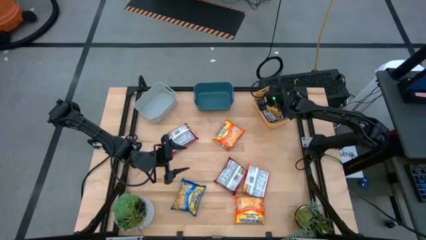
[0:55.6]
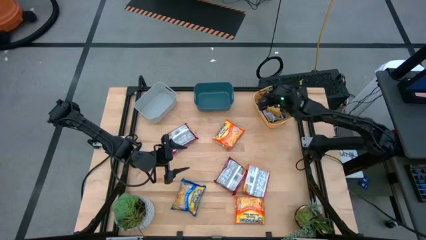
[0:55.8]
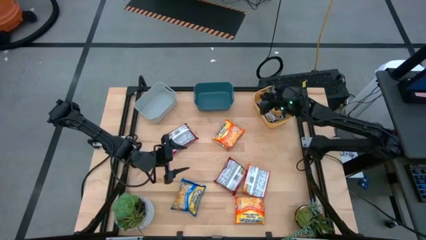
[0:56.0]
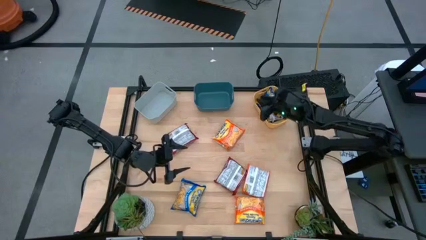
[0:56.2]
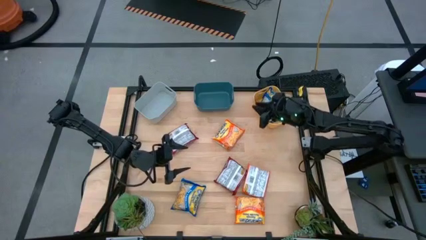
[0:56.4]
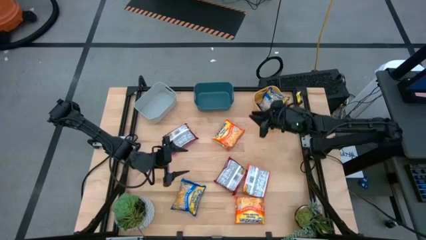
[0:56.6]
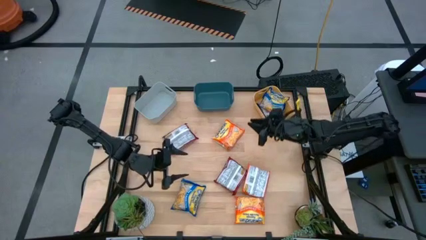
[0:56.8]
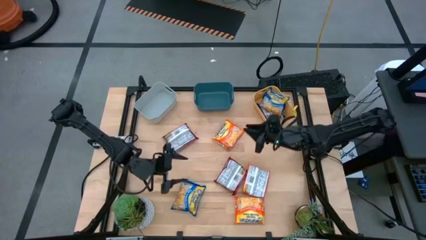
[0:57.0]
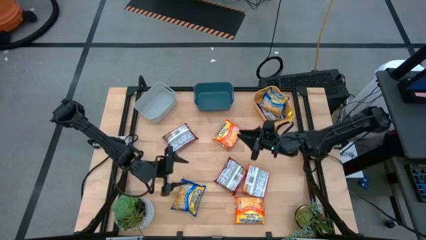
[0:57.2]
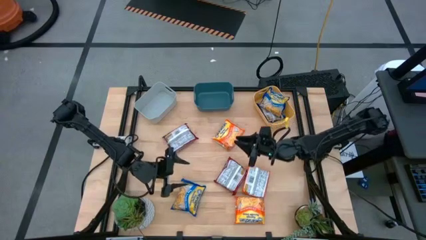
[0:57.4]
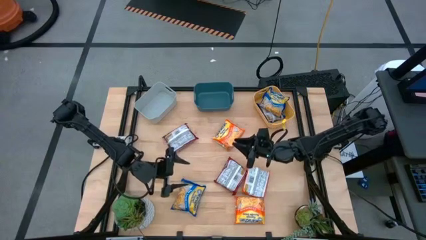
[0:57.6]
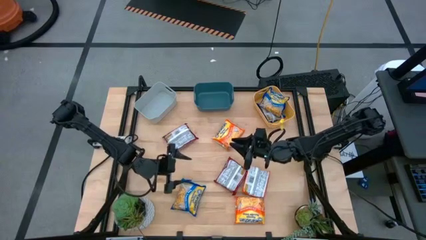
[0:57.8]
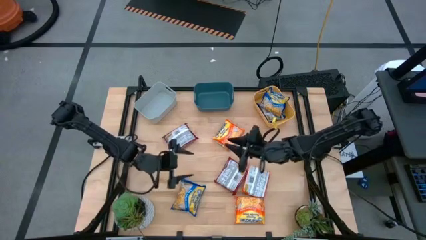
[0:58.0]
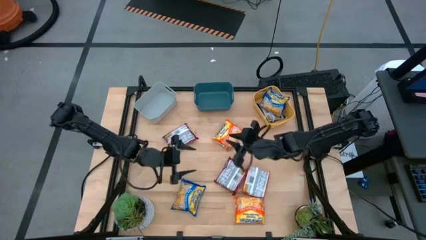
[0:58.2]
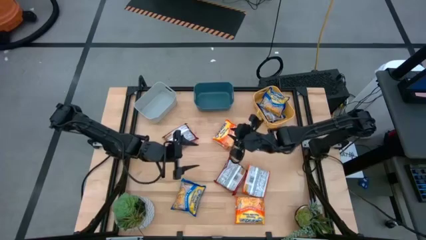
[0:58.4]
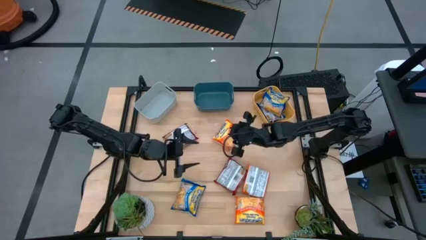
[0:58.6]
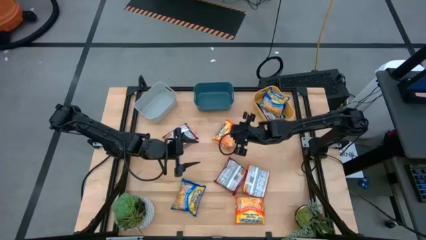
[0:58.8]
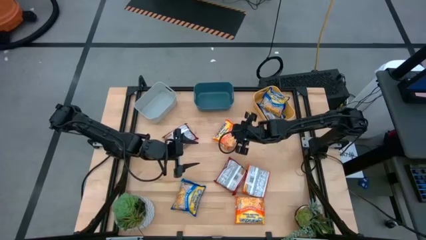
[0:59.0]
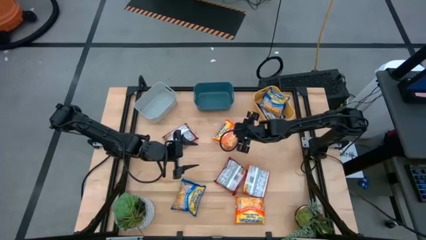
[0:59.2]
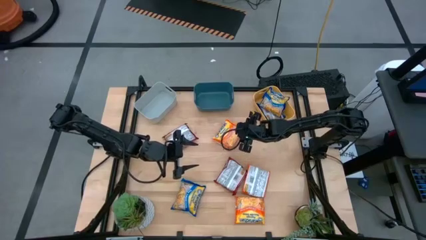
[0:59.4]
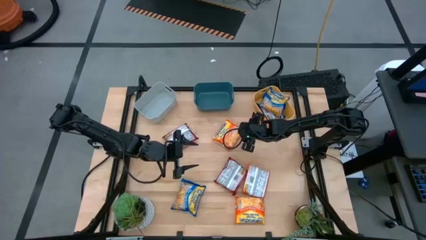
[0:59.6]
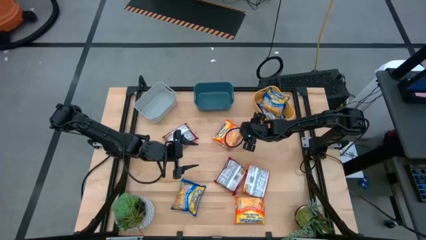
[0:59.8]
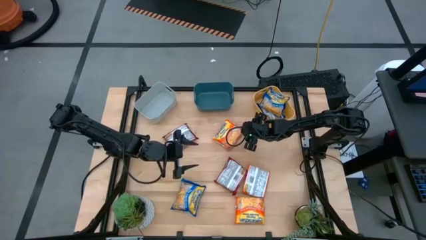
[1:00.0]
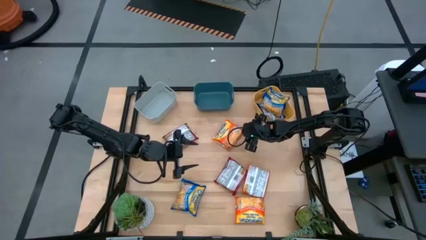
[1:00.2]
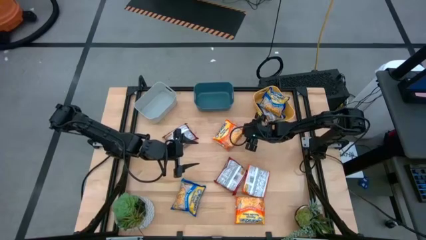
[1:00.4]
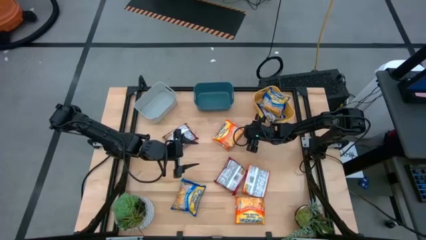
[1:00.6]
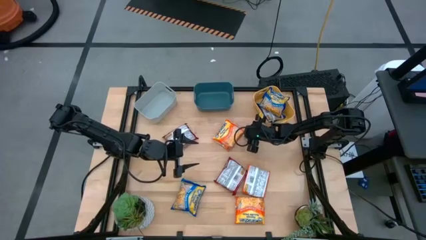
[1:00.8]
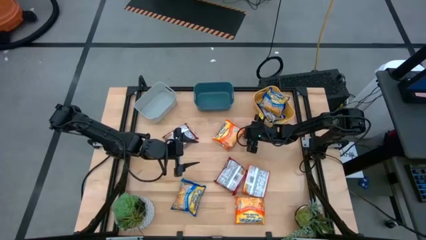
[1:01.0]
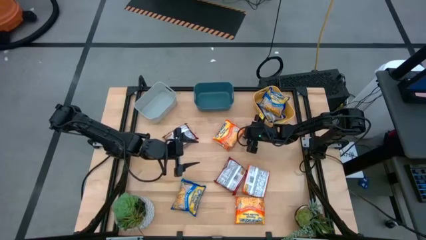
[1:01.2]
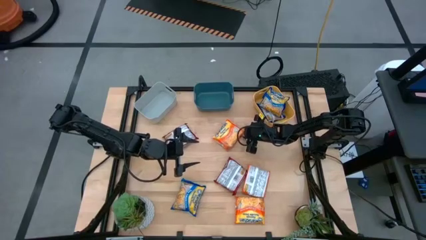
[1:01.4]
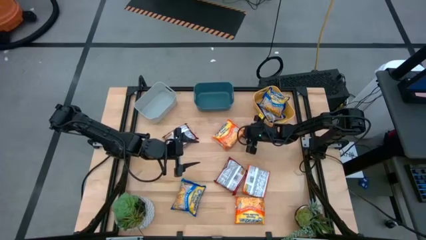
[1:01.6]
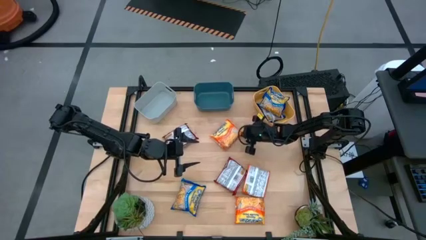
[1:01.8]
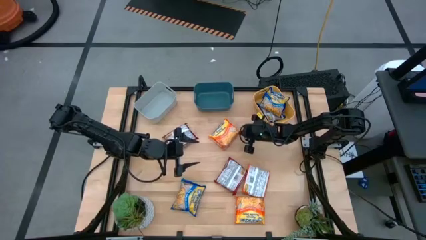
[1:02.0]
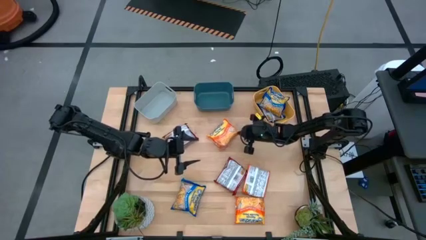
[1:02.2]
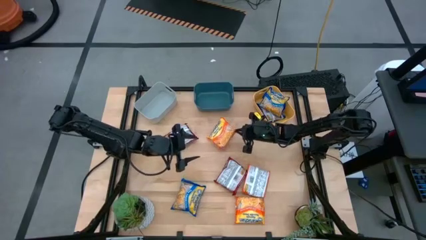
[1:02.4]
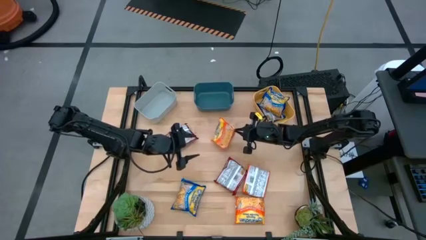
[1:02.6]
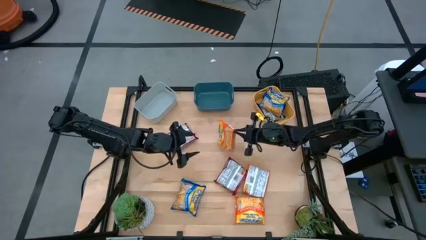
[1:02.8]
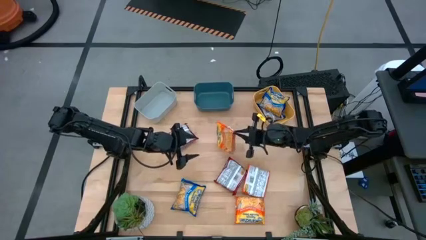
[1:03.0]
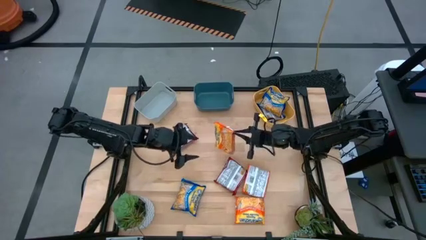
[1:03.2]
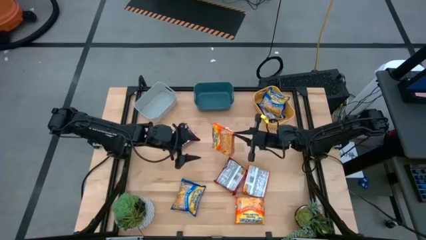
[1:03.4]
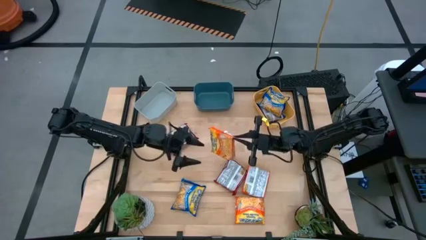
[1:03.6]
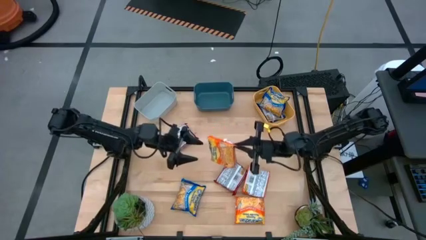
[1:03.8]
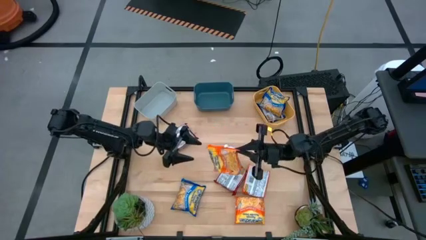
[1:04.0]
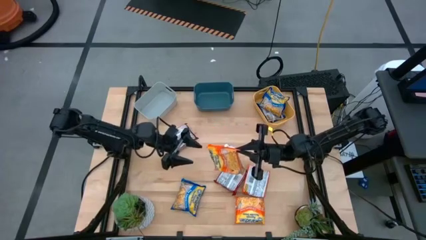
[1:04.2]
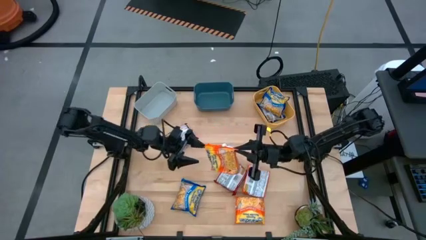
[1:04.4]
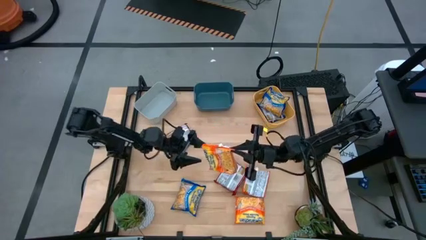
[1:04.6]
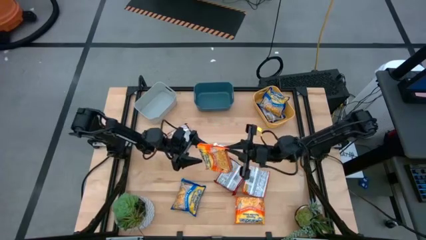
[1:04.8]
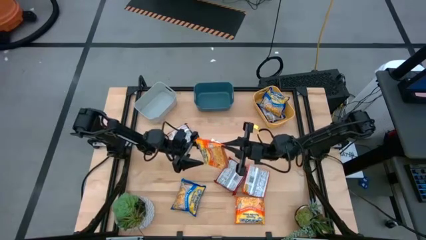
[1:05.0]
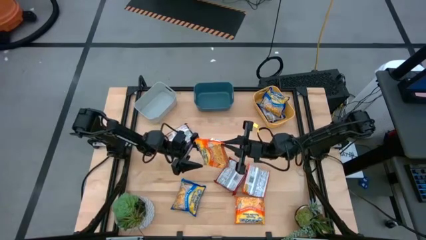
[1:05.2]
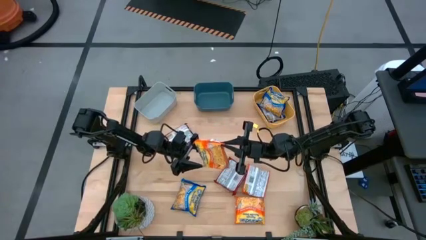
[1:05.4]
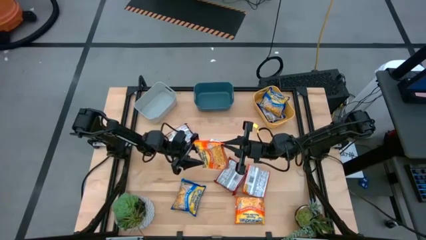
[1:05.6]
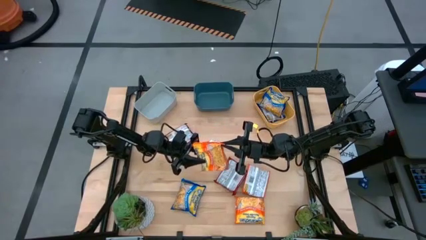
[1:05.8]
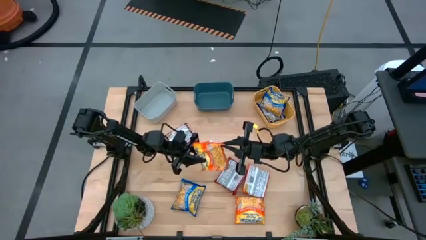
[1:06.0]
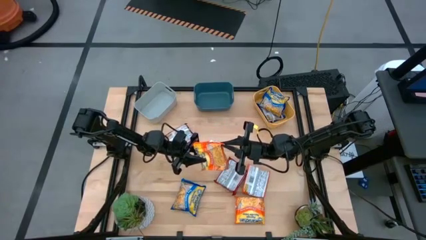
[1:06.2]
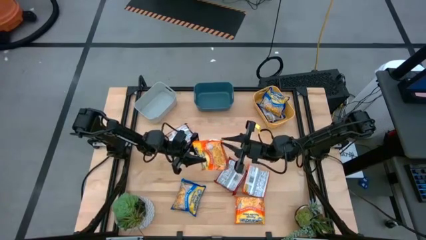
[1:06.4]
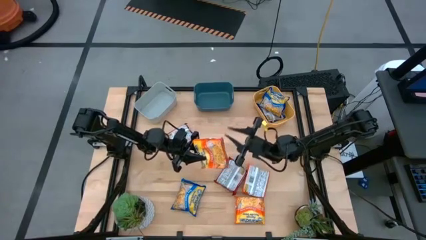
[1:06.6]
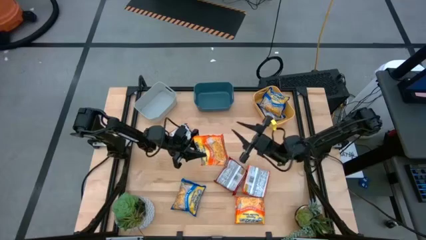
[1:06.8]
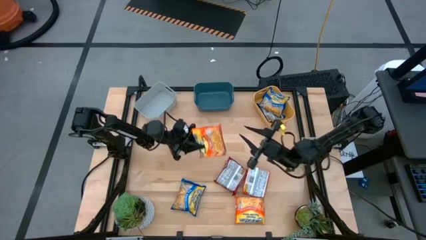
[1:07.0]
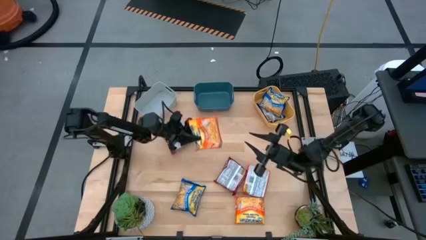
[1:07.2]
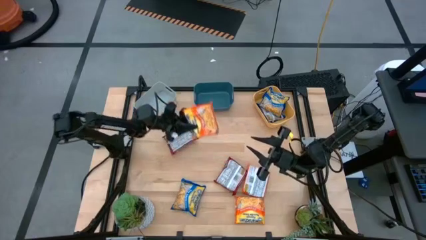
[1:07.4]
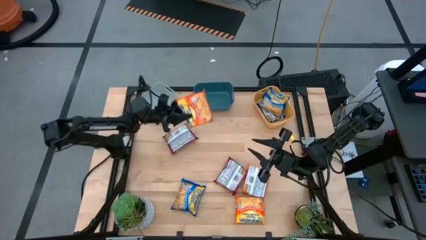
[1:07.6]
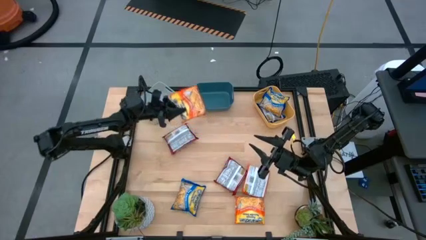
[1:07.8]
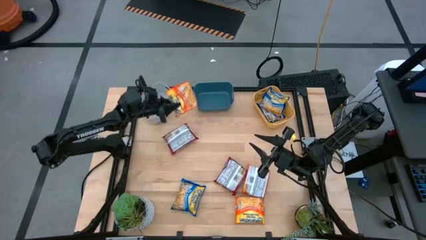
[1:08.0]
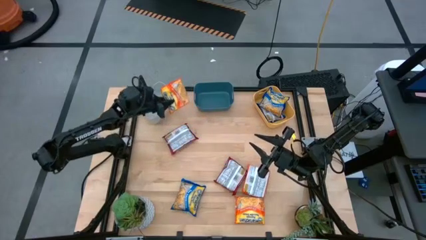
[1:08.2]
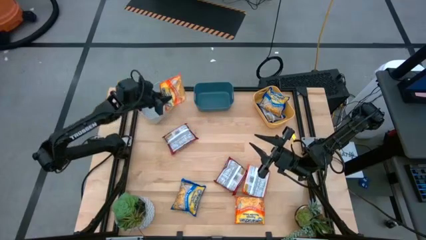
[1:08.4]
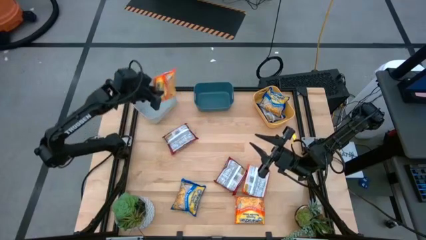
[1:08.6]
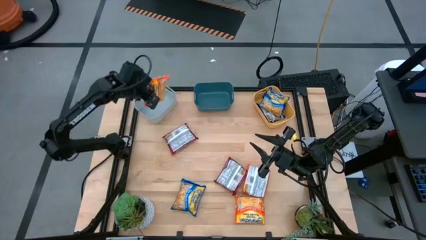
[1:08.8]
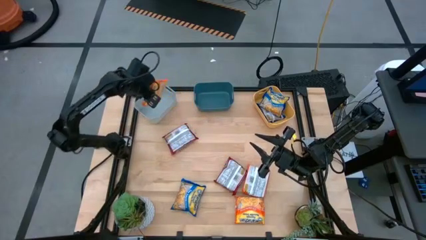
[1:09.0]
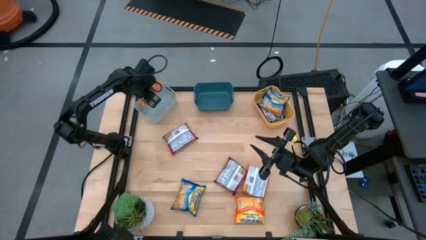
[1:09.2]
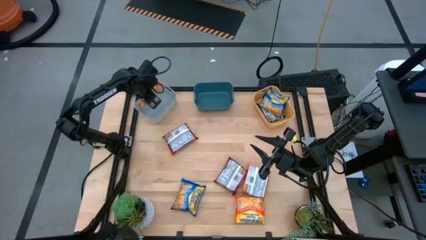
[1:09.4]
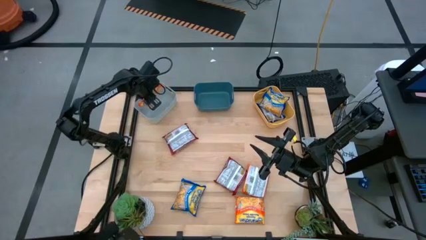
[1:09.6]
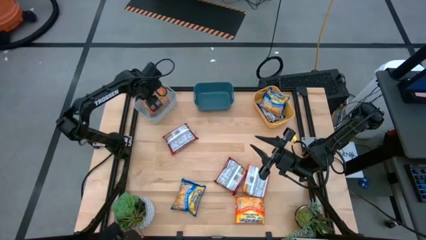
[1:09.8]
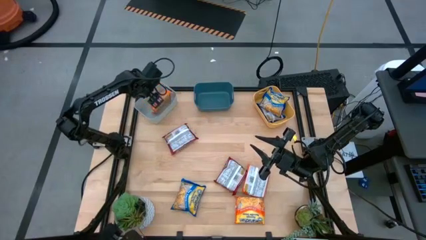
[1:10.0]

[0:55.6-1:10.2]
Task: Sort Maruchan noodles
Put the top orange noodle pack into the gray bin
